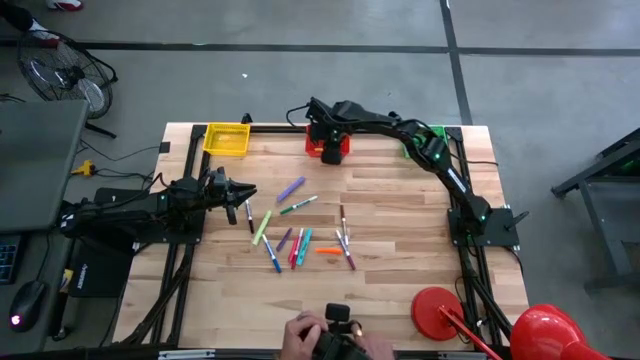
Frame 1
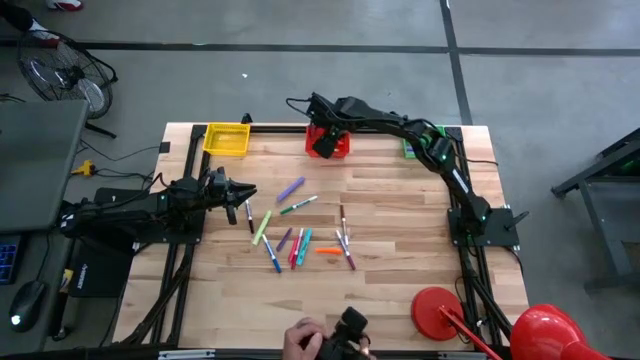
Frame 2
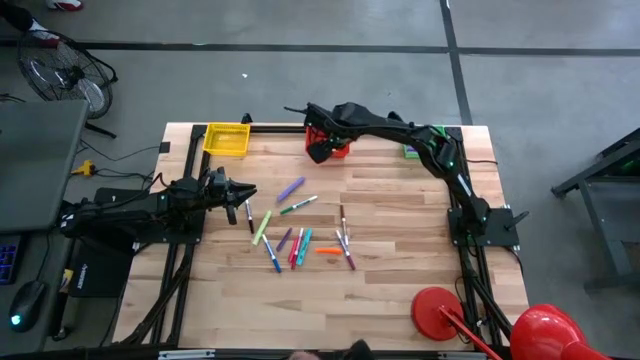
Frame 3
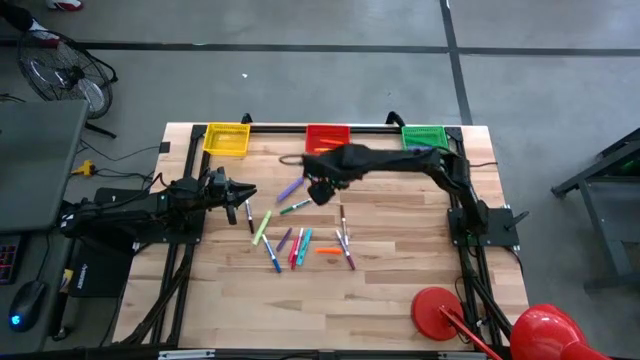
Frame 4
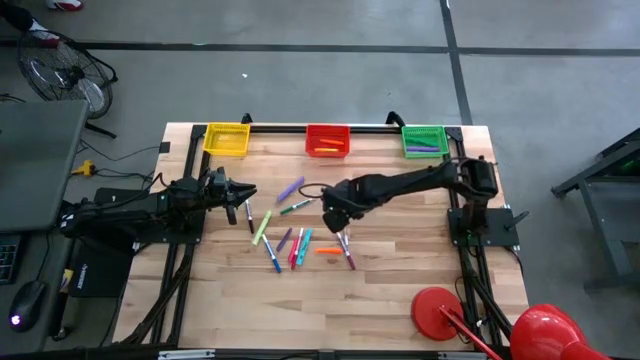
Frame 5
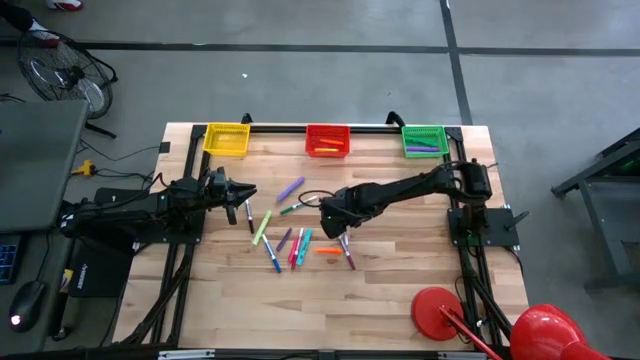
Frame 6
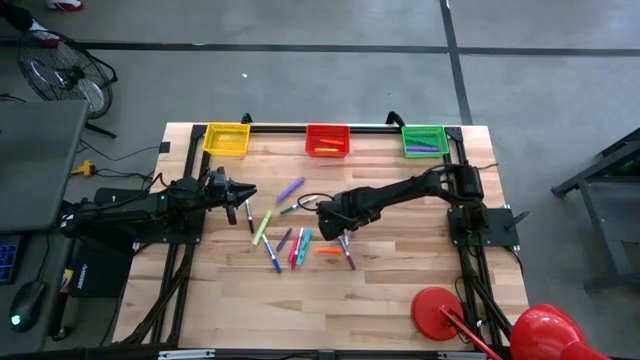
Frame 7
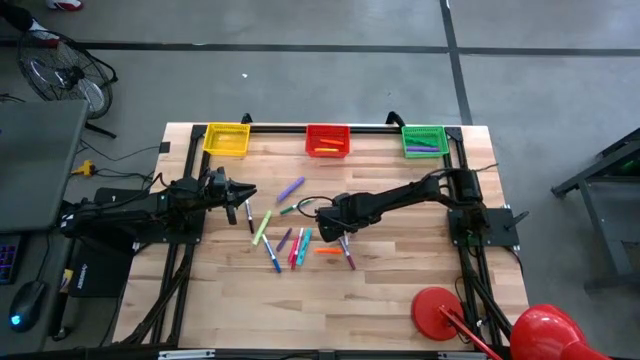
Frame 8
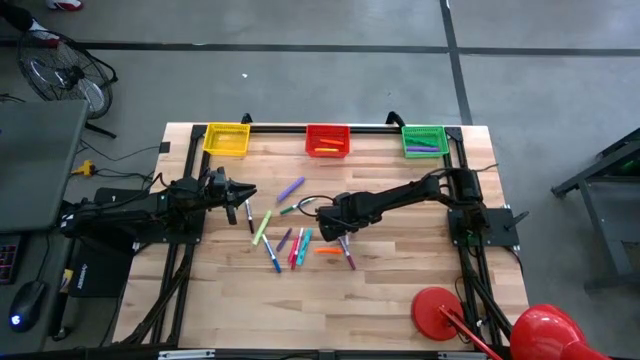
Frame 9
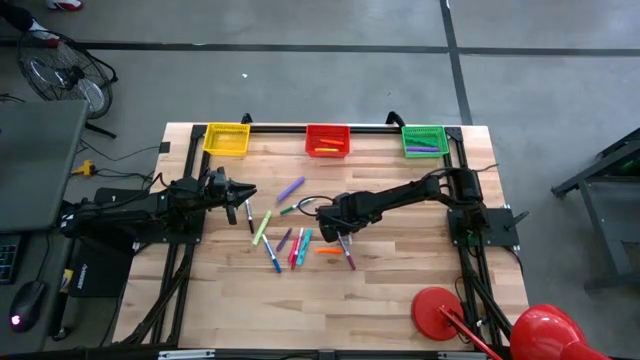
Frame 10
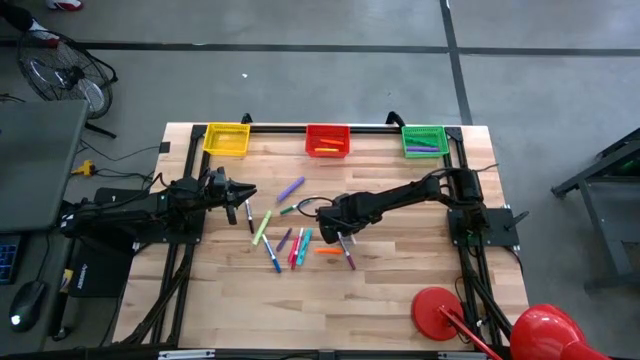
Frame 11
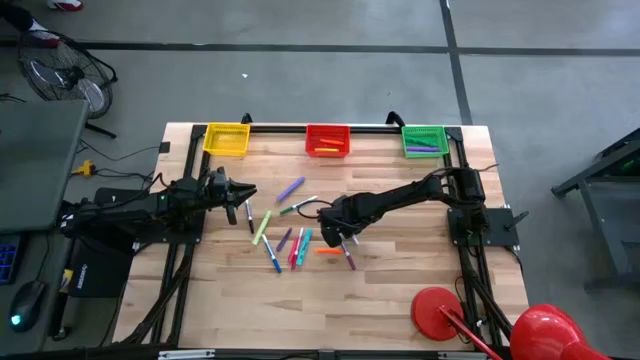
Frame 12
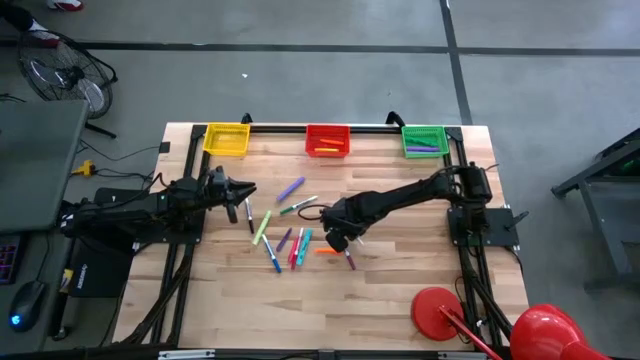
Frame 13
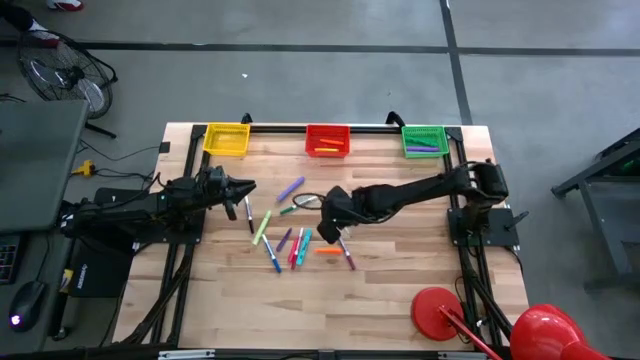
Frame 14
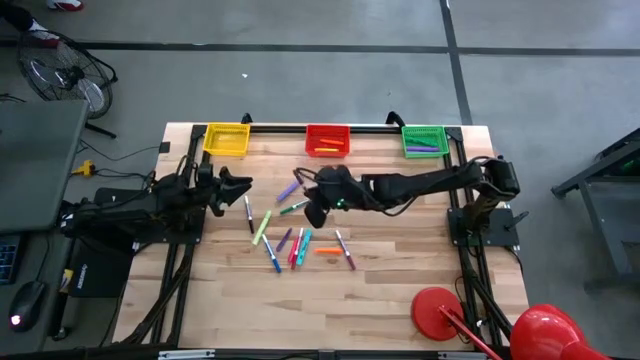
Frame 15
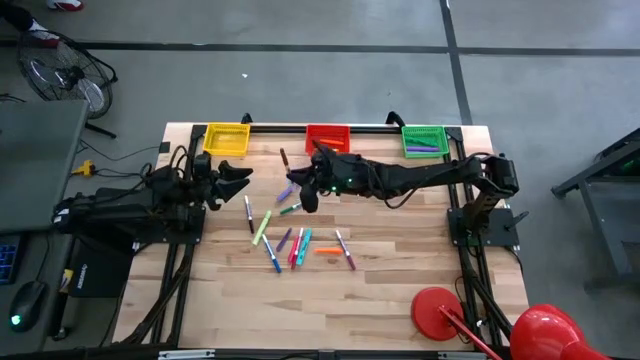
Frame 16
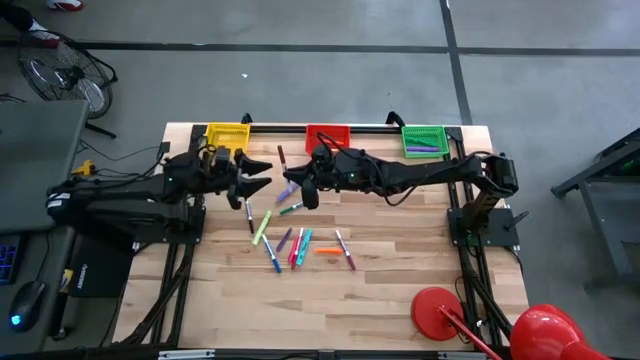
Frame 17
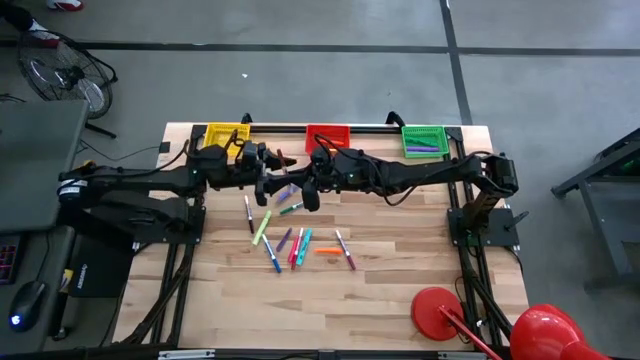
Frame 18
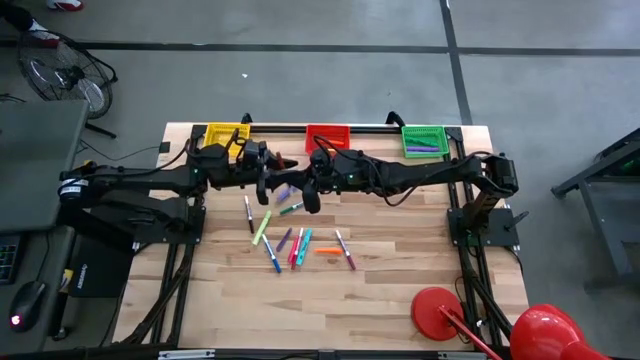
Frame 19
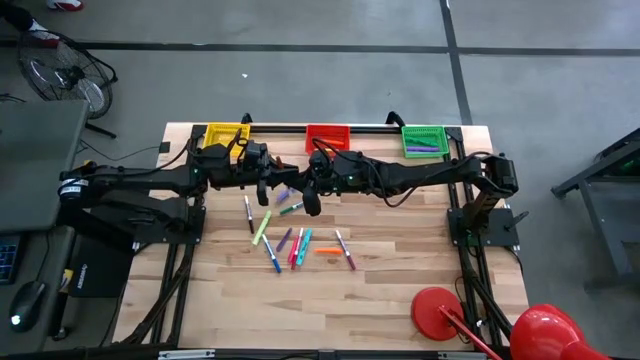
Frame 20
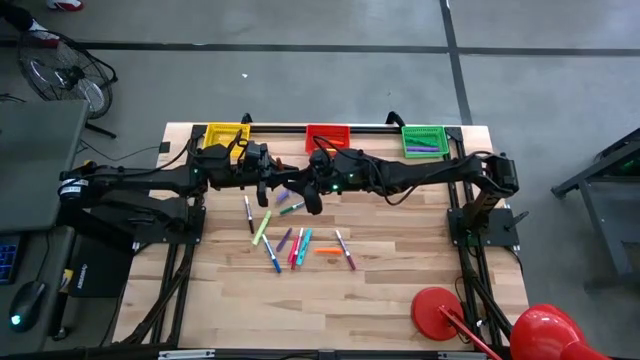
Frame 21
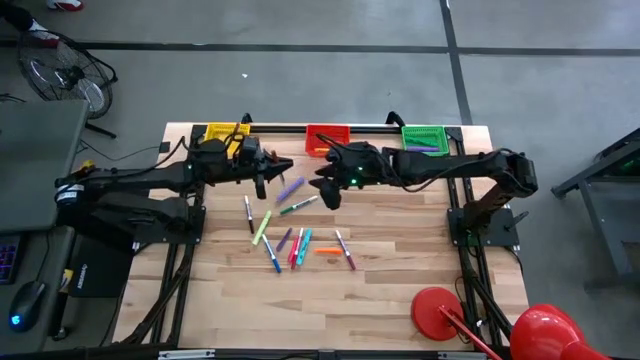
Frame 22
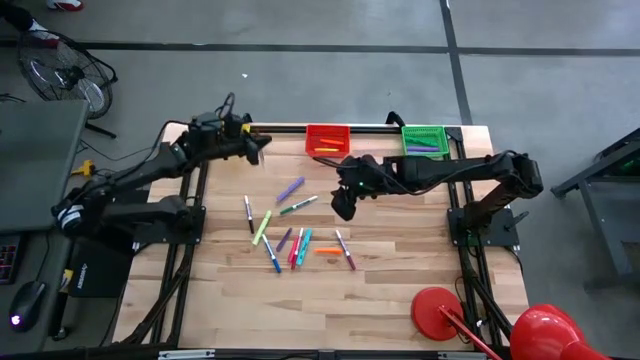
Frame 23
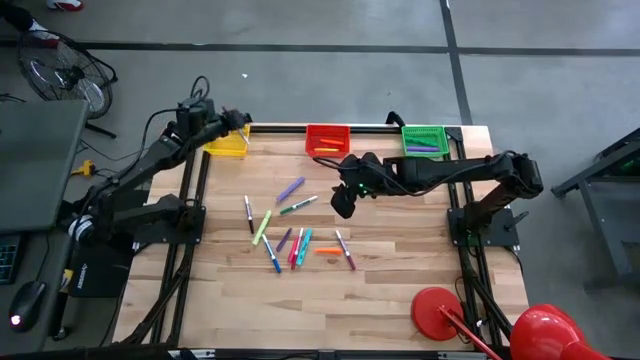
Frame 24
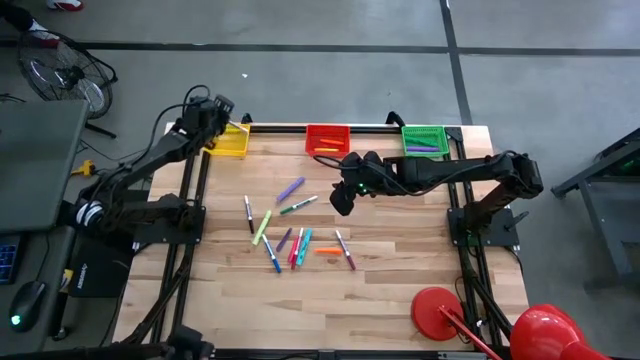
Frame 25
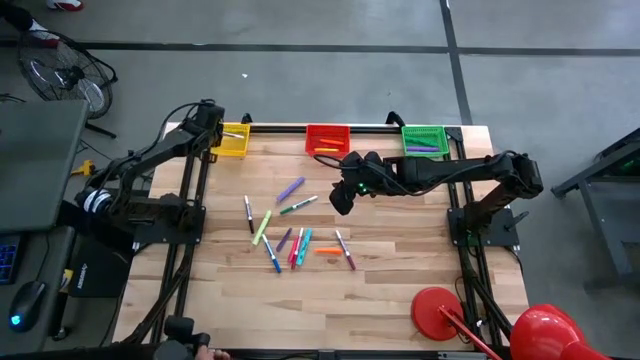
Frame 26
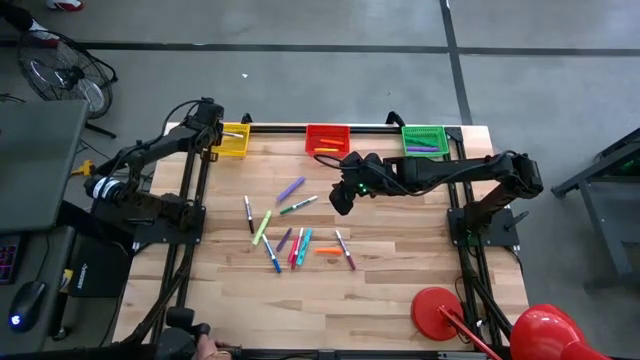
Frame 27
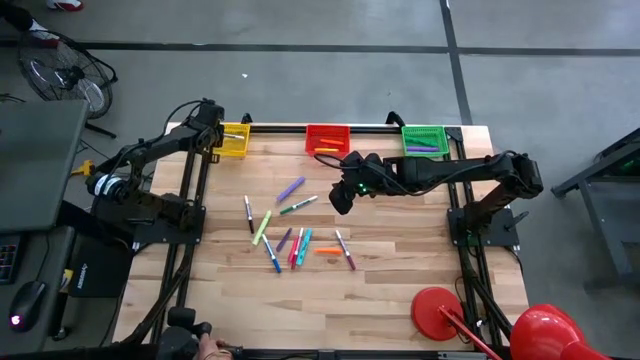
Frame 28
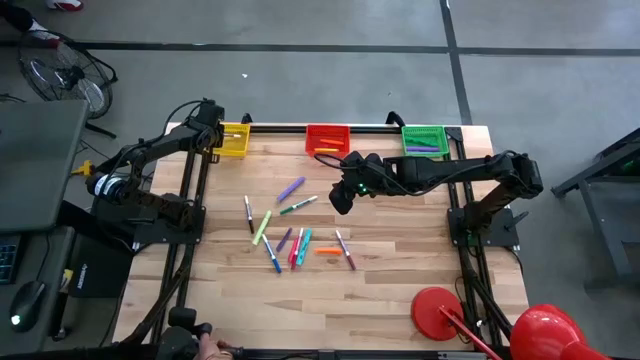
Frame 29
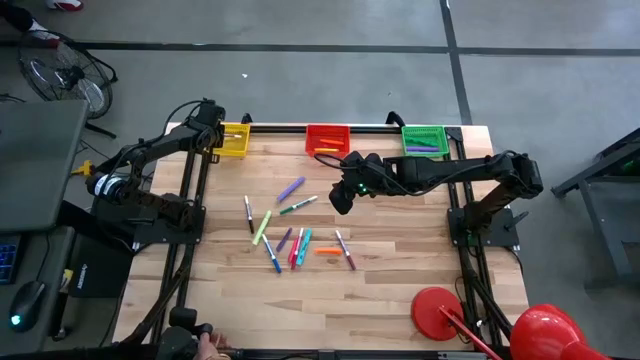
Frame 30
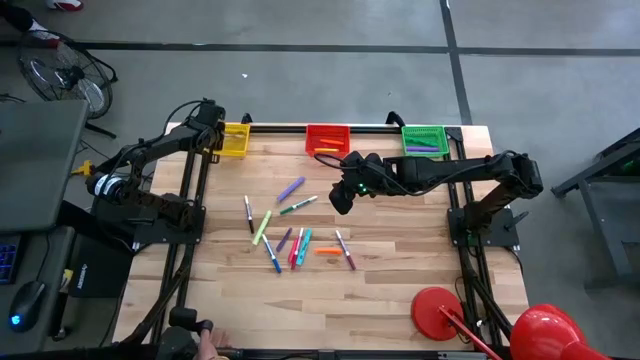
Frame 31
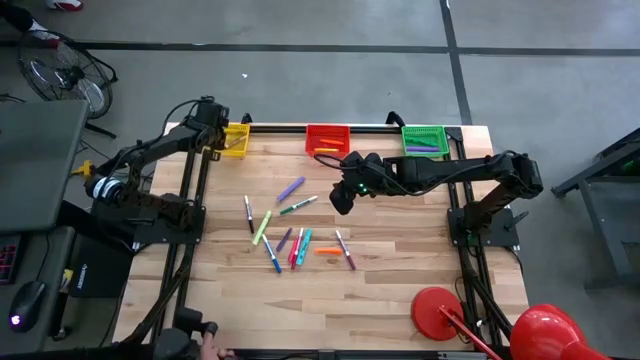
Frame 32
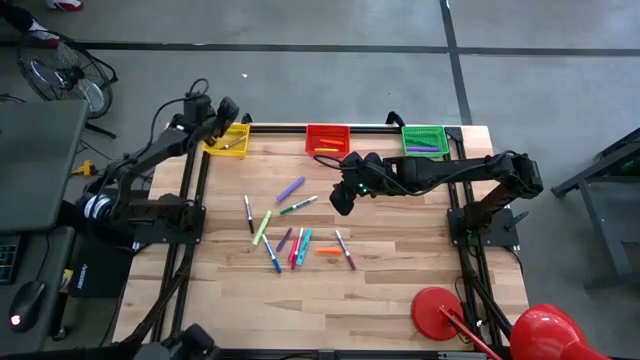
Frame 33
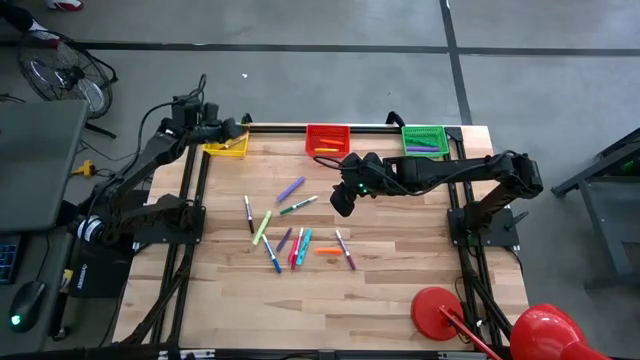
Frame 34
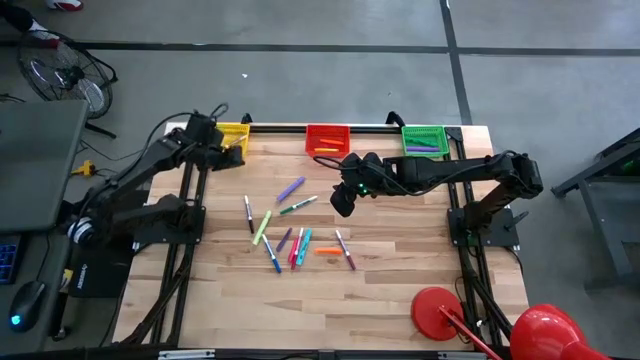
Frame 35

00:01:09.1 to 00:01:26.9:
Task: Pick & Place Markers
Put the brown marker into the yellow bin

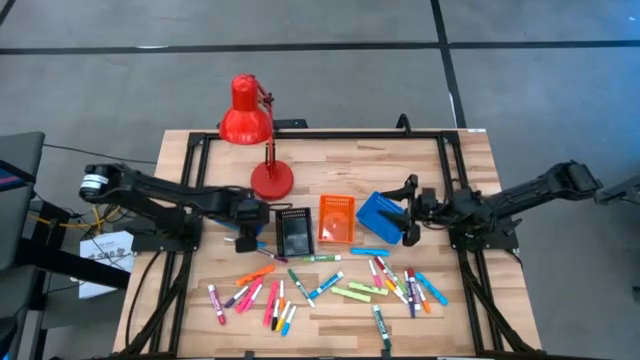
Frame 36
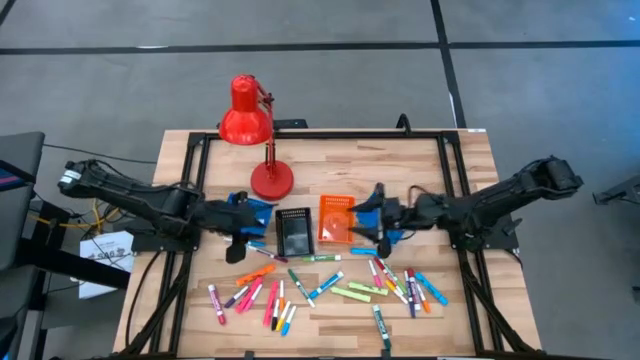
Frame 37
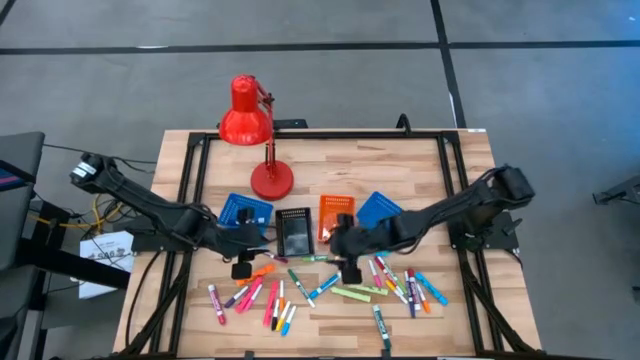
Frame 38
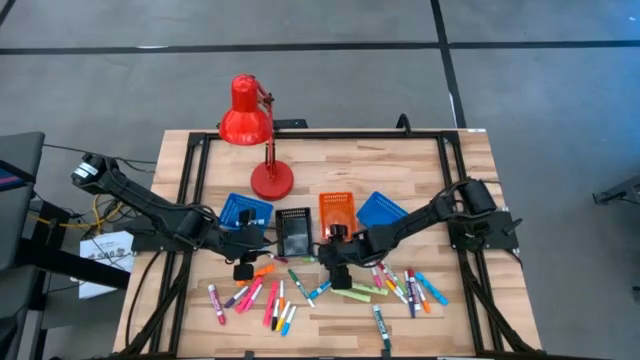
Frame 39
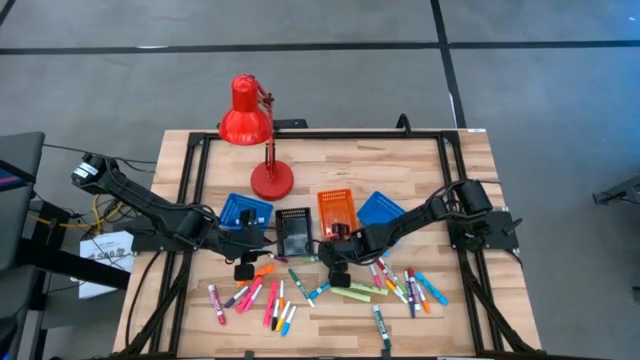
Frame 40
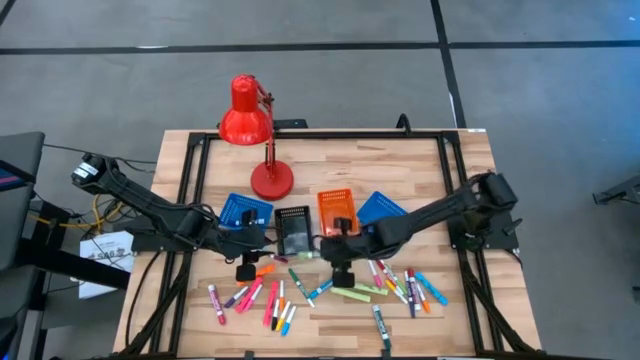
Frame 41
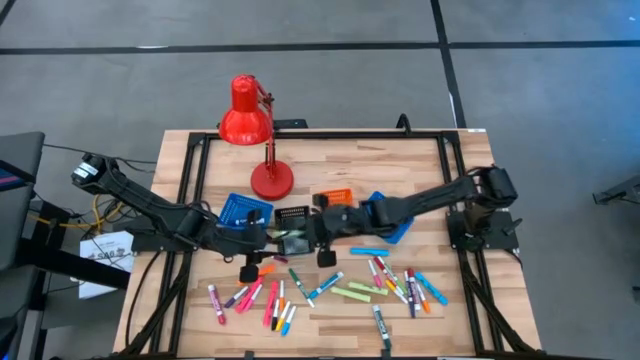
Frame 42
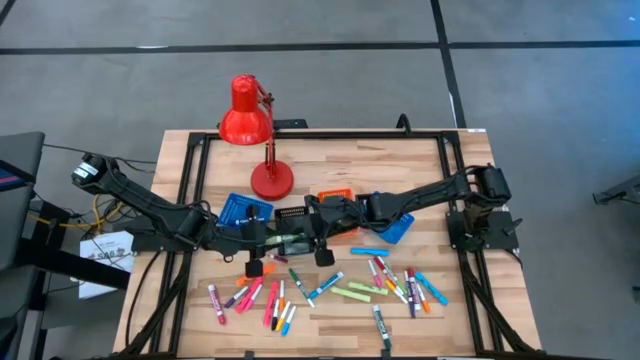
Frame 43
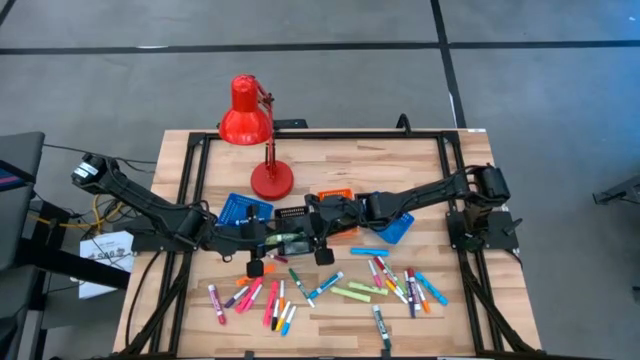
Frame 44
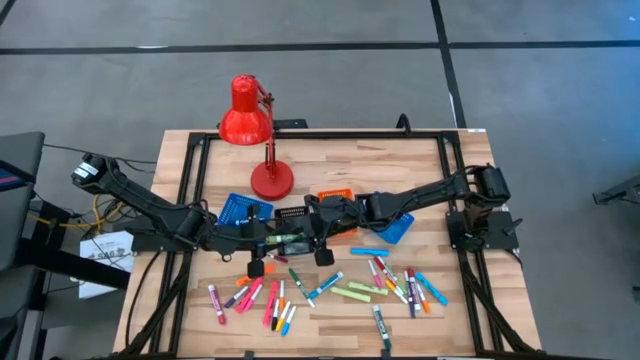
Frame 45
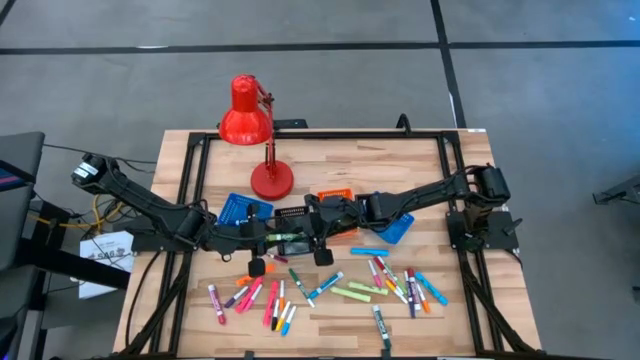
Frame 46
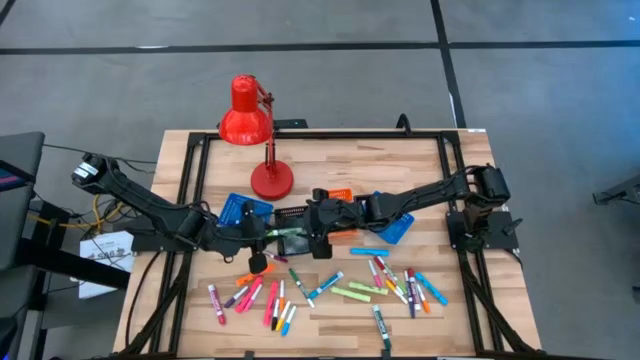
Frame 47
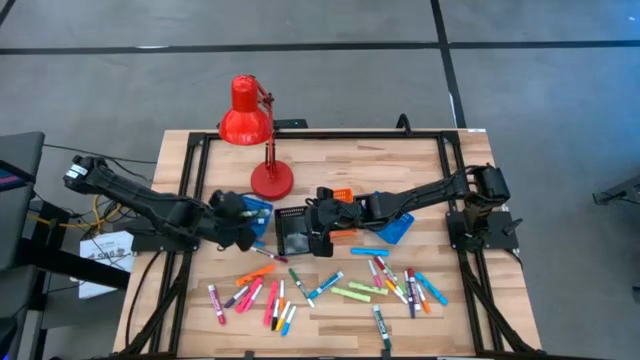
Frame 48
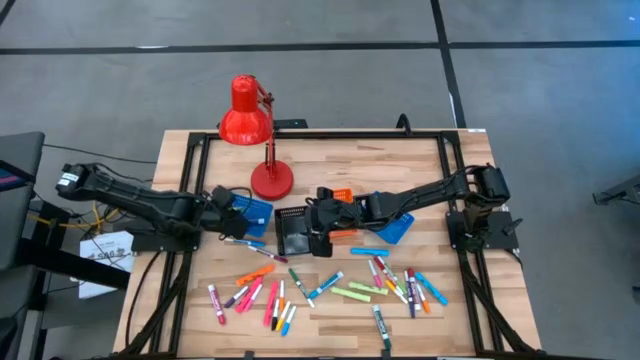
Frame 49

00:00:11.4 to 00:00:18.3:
Task: Pick & Place Markers
Put the large light green marker pen into the left blue basket
